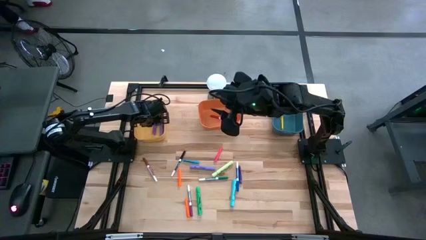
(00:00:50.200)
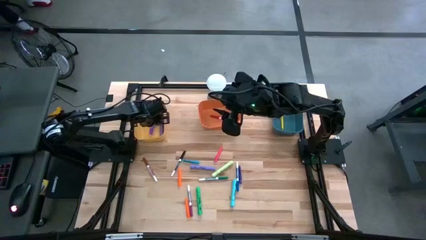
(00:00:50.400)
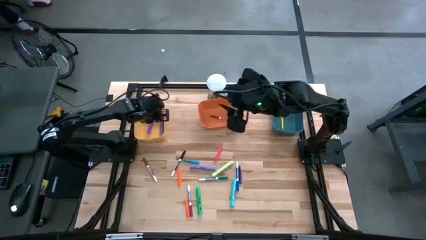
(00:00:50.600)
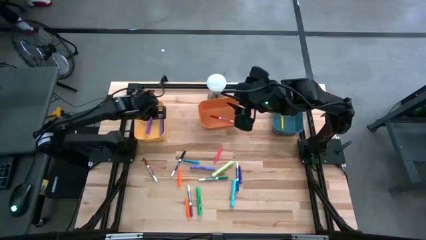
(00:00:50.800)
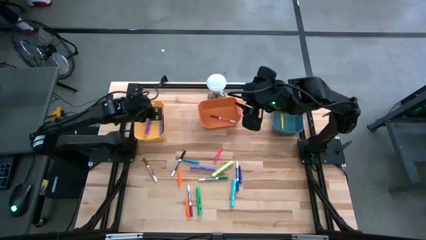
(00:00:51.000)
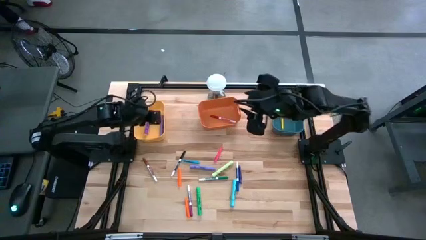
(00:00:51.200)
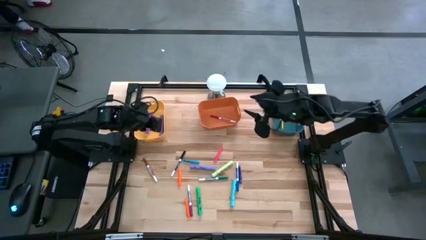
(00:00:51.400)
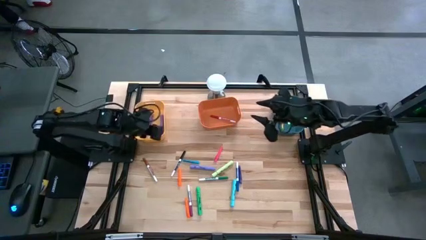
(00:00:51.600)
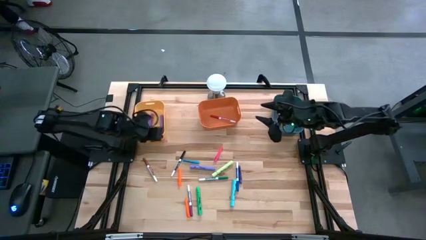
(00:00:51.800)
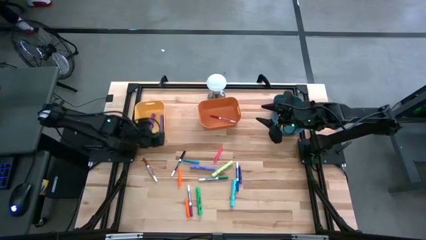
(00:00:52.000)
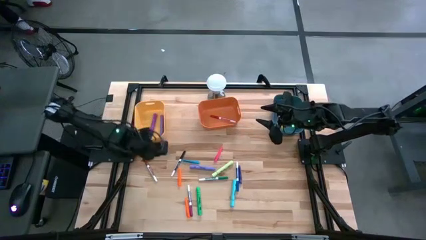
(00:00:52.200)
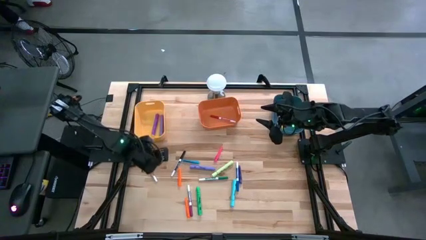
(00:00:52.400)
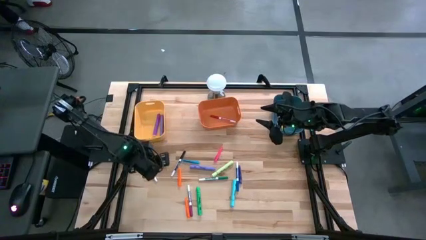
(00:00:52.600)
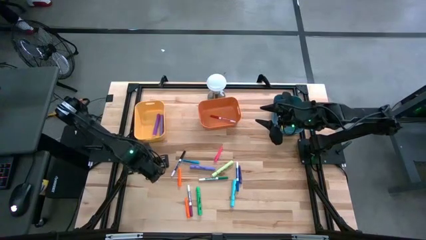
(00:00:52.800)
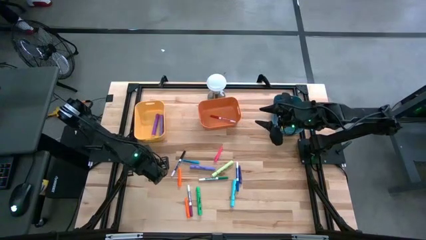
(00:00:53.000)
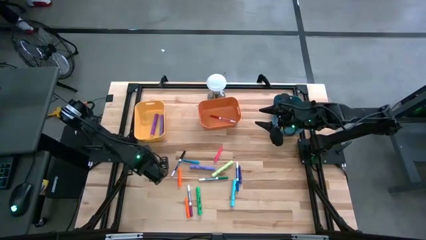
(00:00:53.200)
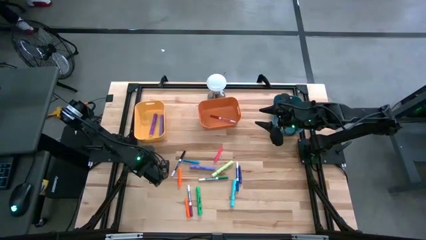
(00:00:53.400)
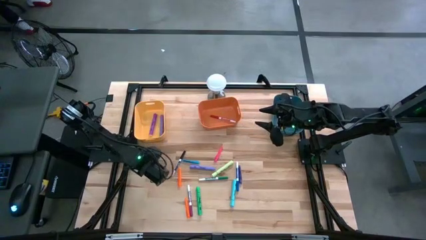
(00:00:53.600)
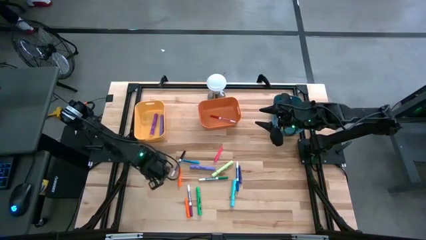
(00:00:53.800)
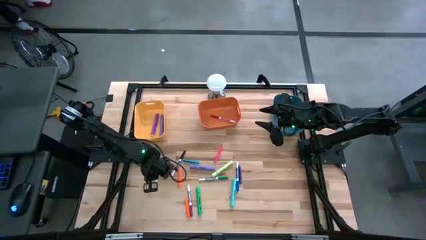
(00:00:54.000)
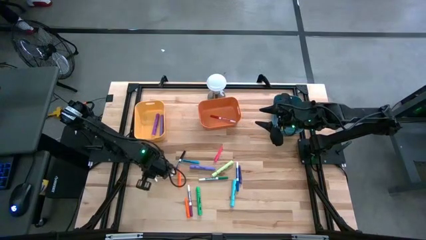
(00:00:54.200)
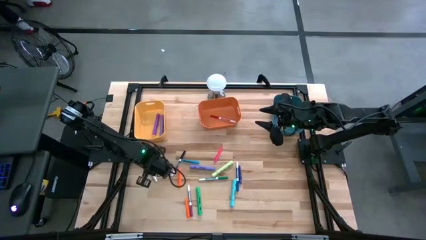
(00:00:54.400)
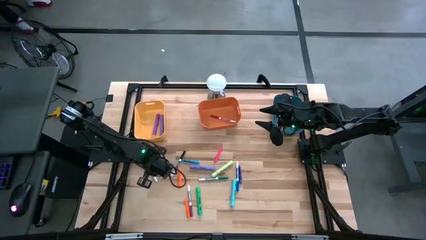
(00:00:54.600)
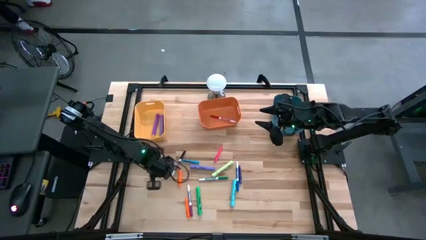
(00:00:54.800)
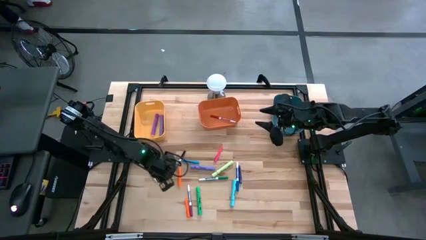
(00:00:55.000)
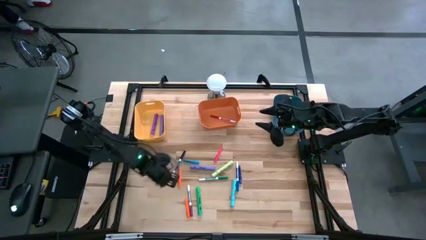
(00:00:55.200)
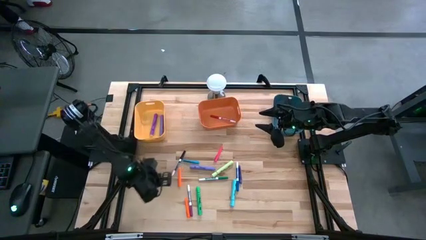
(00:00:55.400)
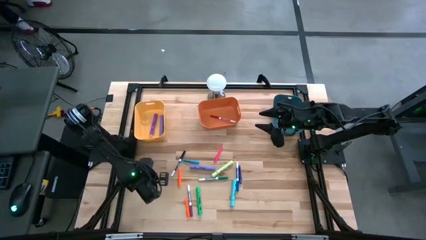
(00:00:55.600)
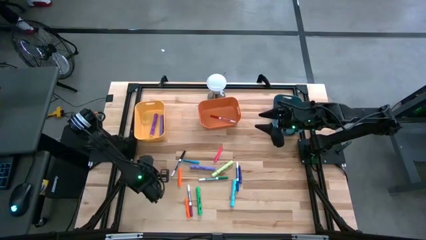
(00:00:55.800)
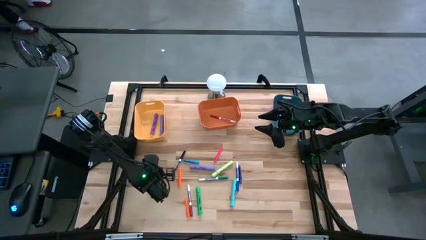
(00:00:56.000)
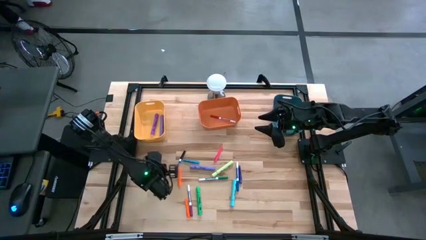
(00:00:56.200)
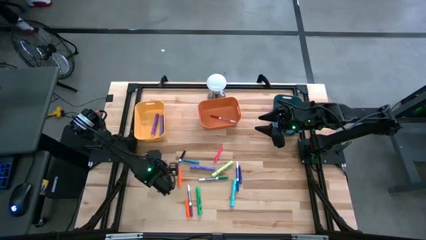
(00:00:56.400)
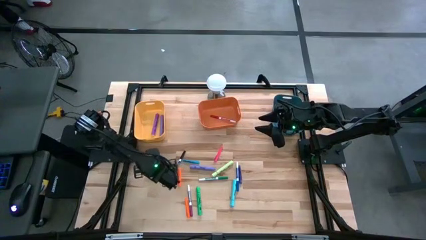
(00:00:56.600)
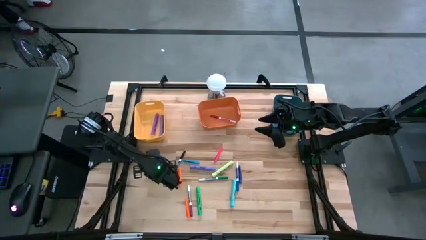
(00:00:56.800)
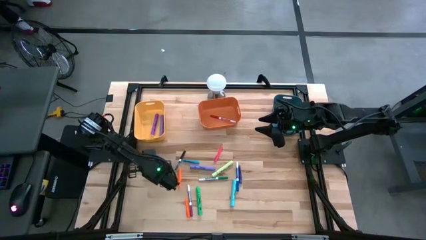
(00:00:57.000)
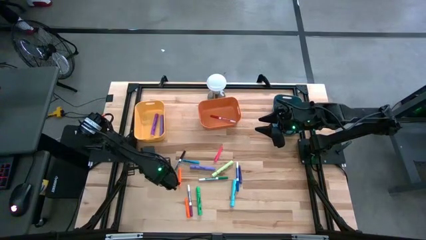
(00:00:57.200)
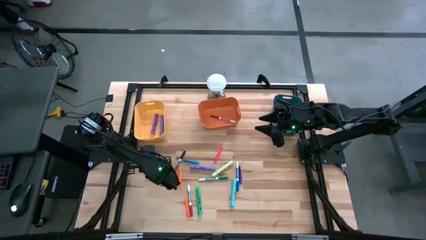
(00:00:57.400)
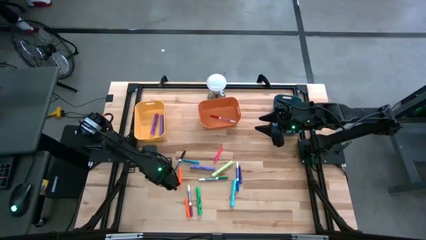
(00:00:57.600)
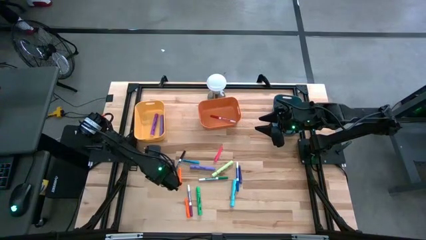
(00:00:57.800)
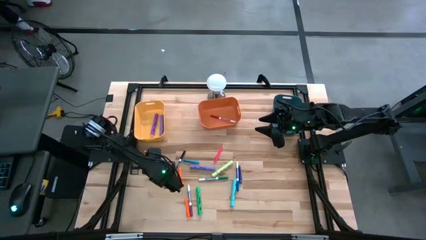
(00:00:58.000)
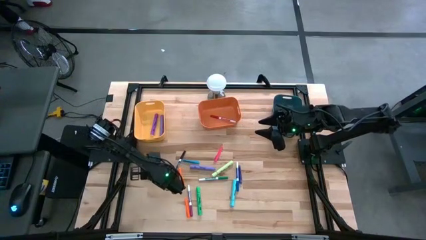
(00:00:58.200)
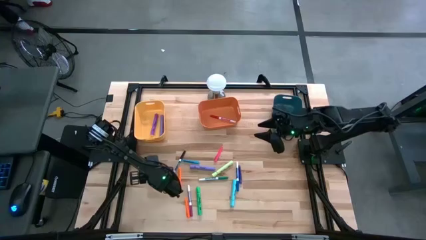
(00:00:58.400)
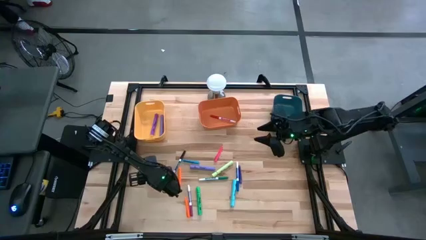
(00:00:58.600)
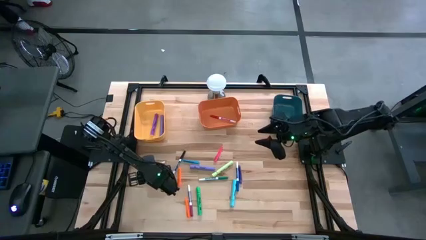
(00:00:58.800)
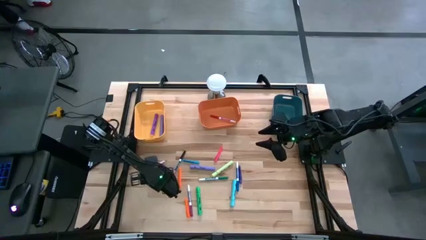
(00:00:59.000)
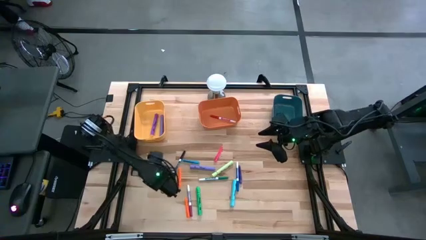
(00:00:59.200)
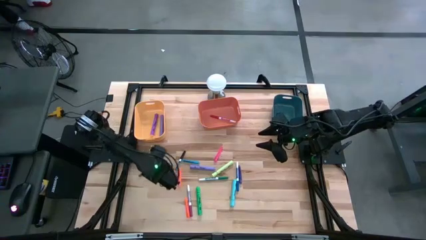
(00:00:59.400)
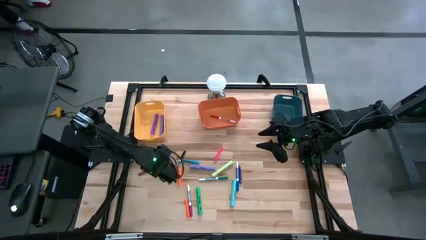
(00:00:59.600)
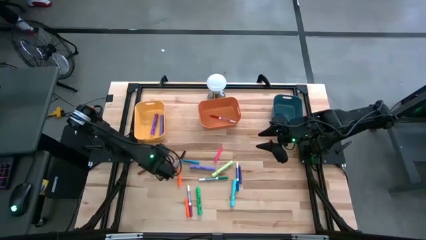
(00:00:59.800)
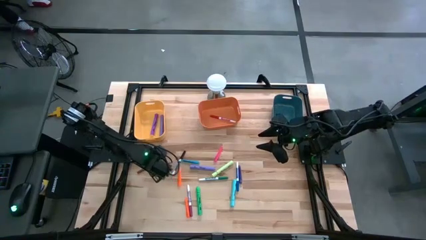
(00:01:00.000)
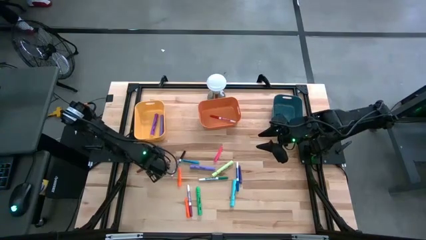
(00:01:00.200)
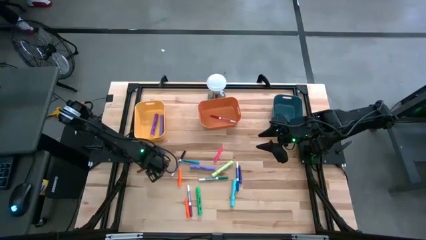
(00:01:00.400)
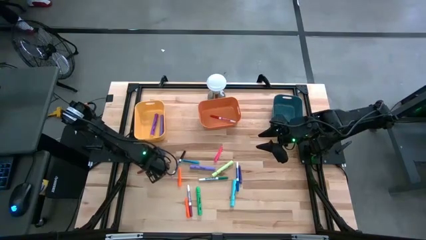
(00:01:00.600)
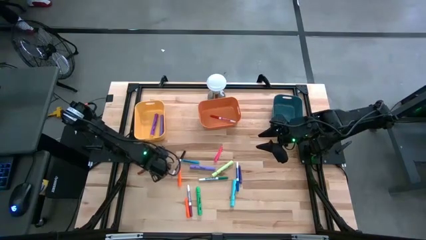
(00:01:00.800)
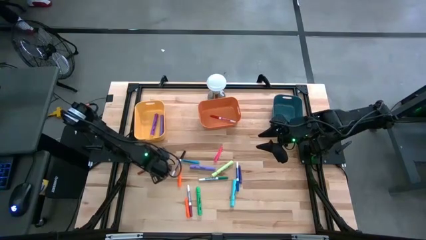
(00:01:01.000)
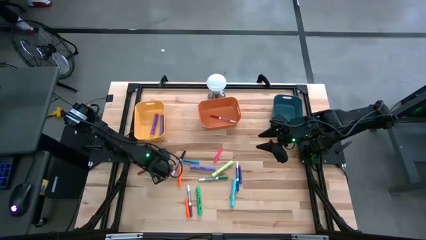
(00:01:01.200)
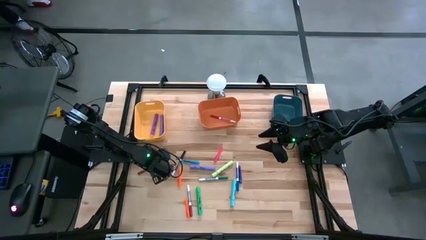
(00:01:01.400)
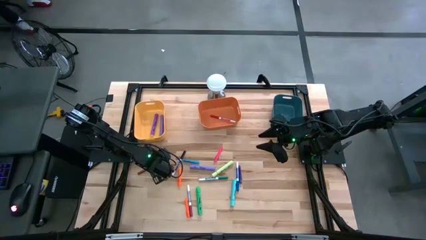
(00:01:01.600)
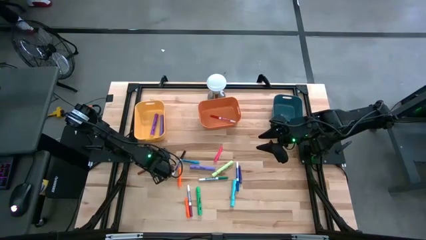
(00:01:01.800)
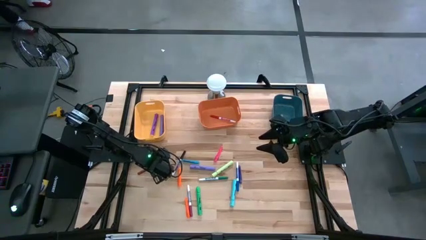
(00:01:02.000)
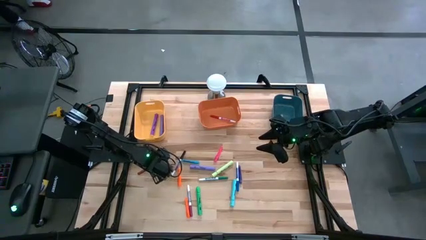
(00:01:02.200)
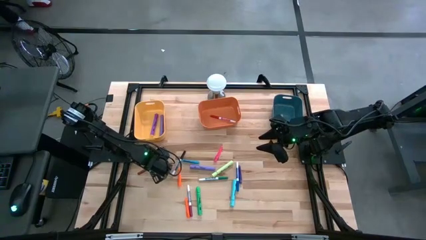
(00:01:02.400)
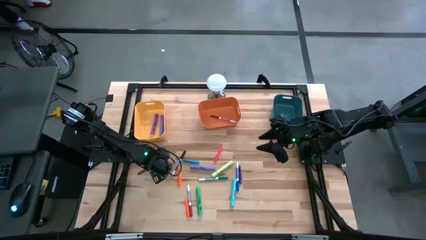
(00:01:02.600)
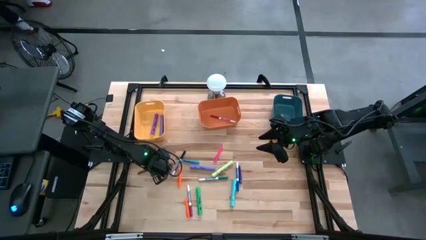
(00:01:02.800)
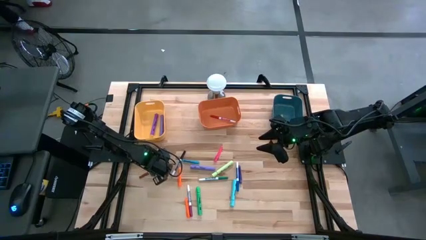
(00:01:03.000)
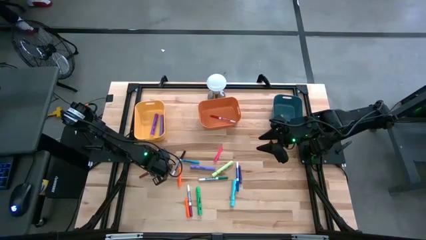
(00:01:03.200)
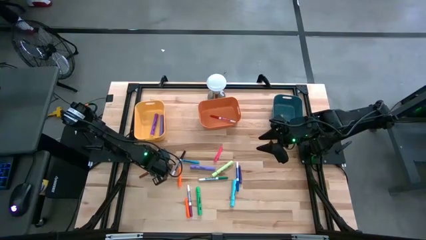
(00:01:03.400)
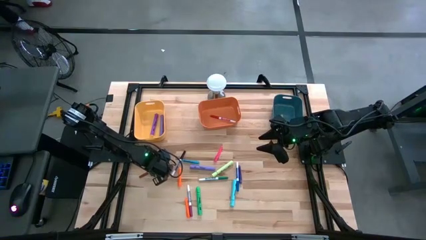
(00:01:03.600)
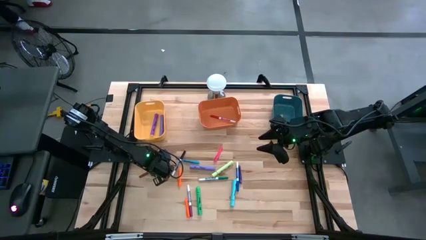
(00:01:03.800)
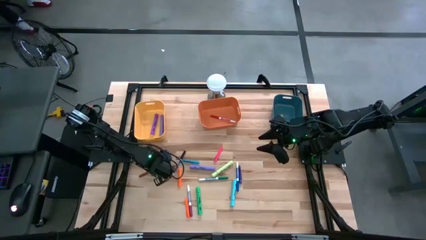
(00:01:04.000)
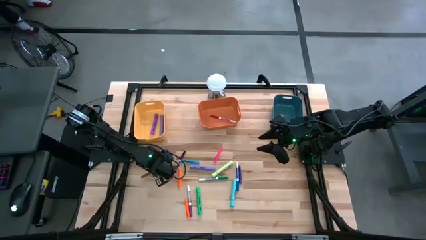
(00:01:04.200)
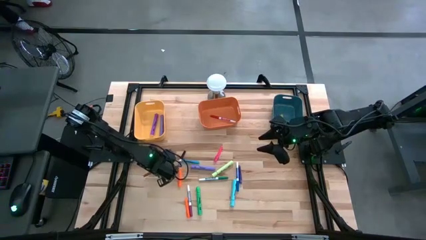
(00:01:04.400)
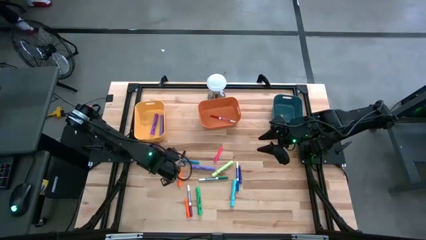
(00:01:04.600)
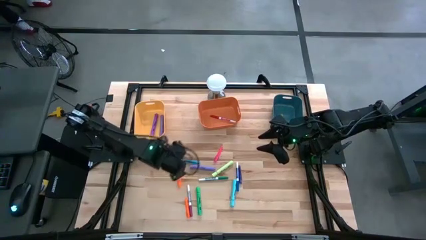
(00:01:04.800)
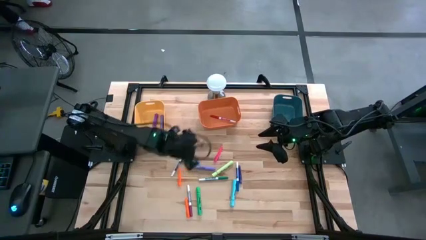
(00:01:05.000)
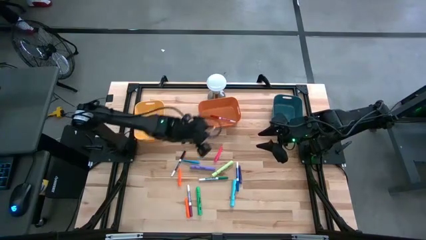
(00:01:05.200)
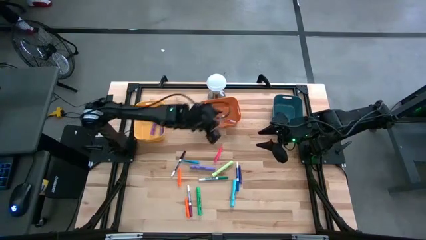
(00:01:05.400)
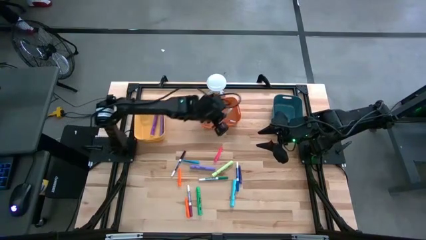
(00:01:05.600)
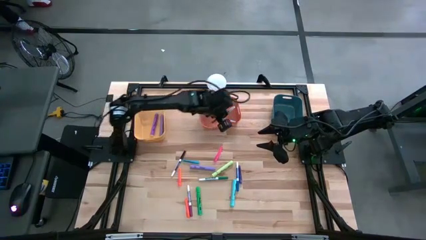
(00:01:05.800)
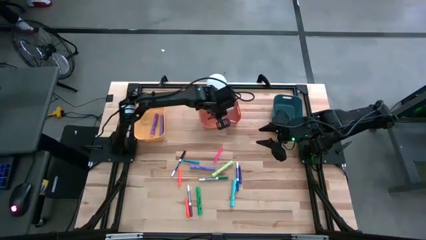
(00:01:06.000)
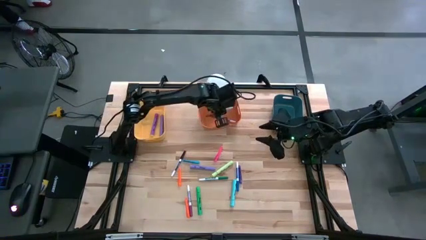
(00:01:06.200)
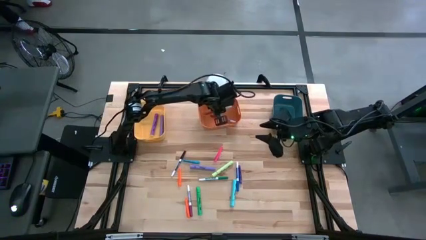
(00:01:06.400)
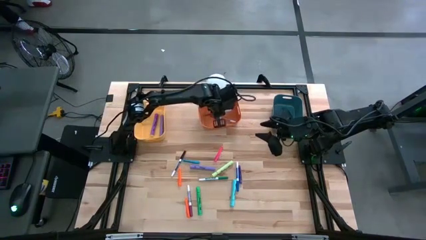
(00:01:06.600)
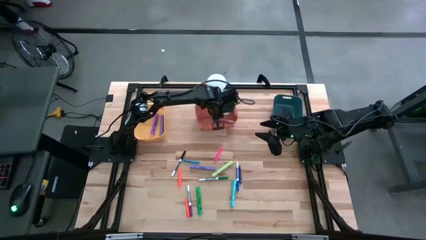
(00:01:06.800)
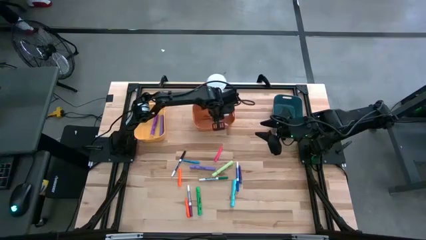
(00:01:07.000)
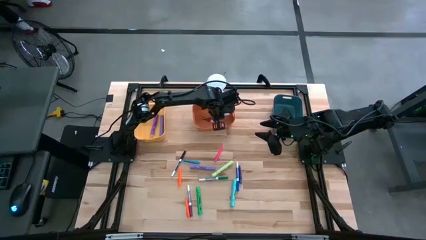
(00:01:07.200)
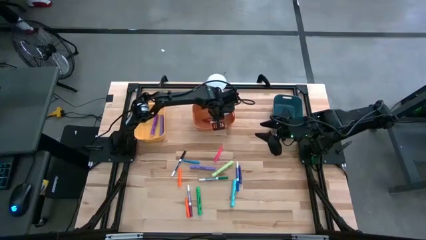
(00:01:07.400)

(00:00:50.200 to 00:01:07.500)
Task: Pick & Place Markers
Put the brown marker pen into the orange bin
